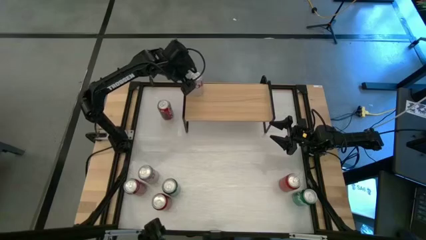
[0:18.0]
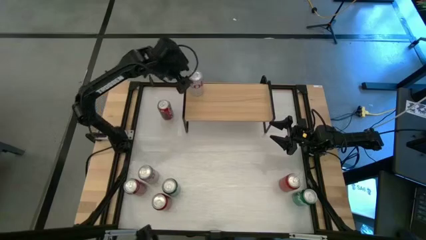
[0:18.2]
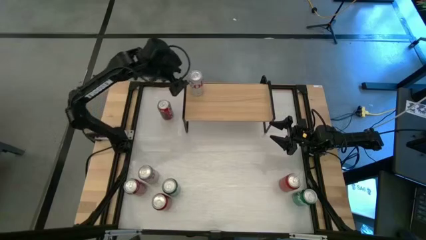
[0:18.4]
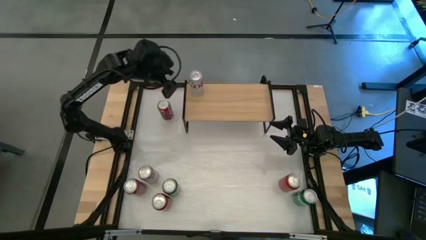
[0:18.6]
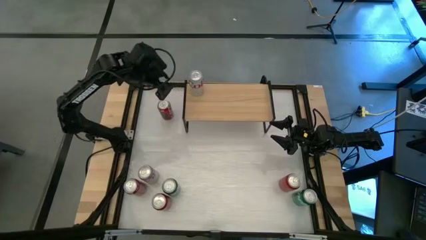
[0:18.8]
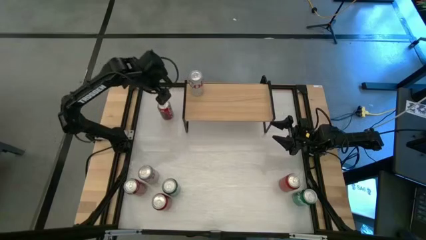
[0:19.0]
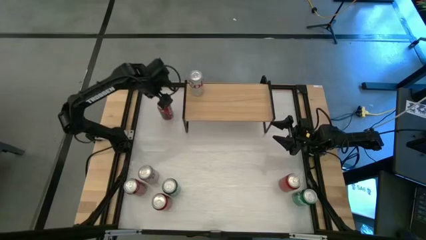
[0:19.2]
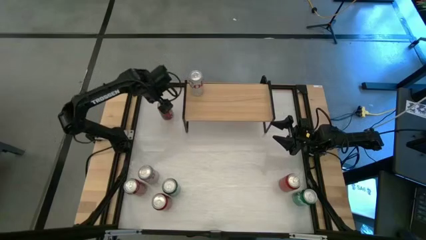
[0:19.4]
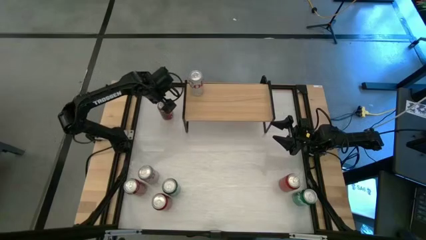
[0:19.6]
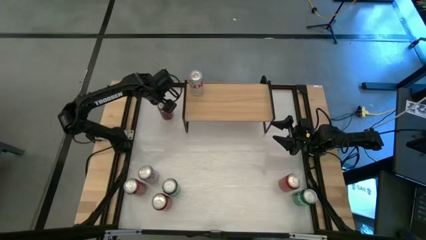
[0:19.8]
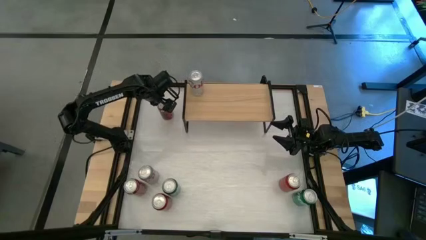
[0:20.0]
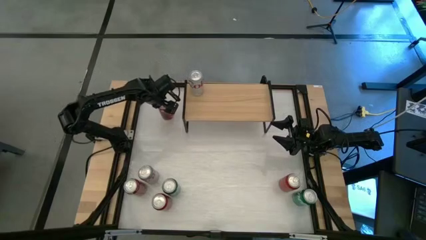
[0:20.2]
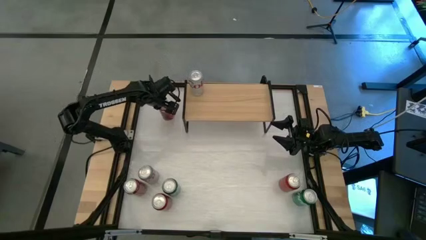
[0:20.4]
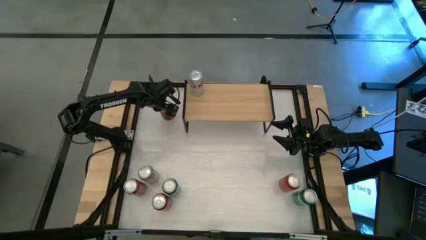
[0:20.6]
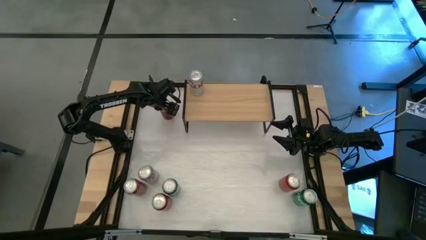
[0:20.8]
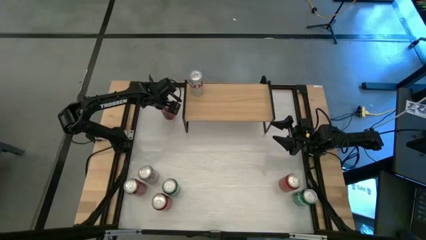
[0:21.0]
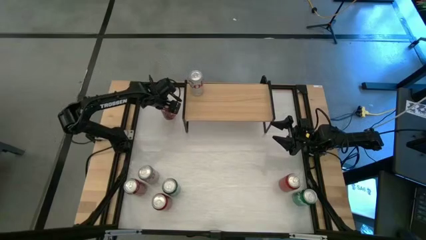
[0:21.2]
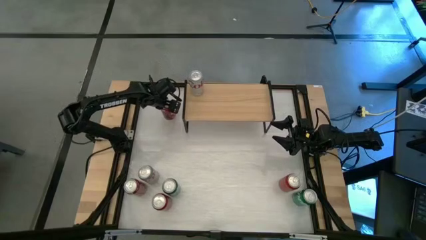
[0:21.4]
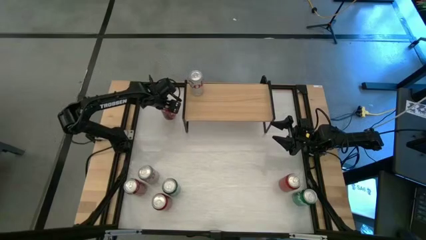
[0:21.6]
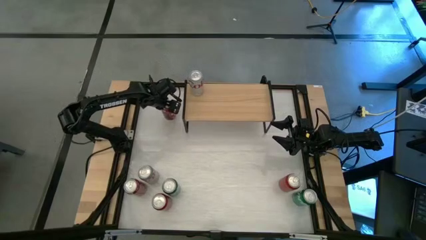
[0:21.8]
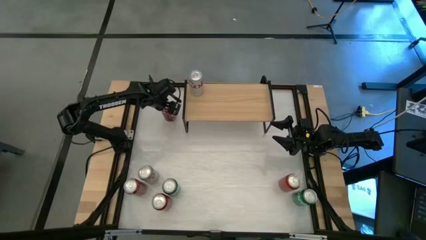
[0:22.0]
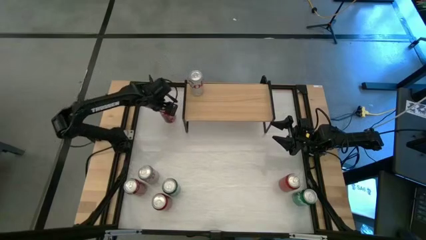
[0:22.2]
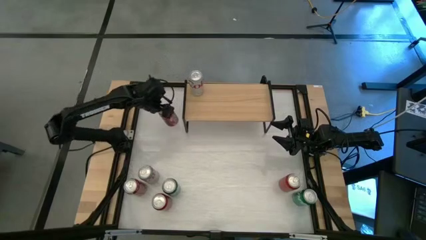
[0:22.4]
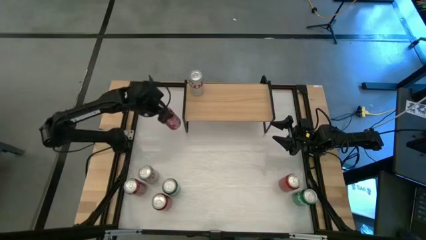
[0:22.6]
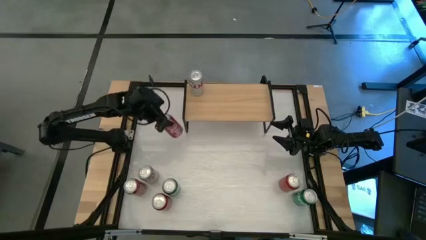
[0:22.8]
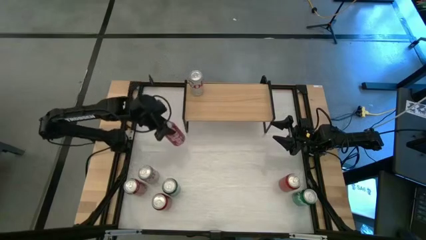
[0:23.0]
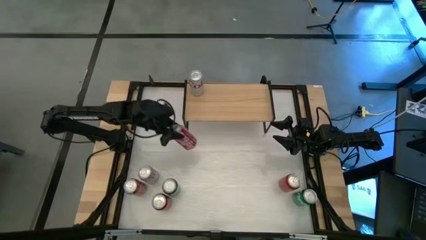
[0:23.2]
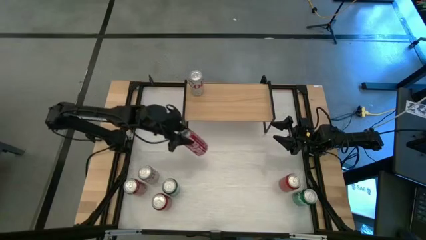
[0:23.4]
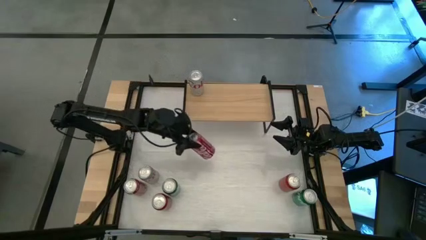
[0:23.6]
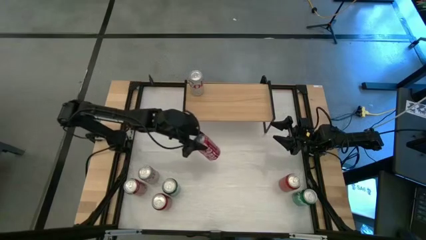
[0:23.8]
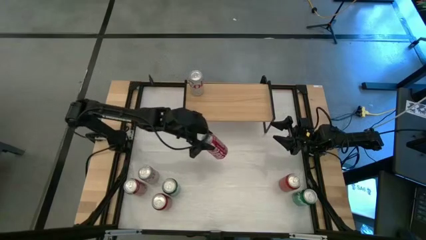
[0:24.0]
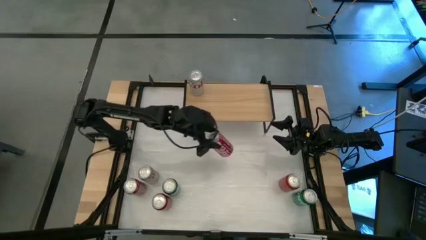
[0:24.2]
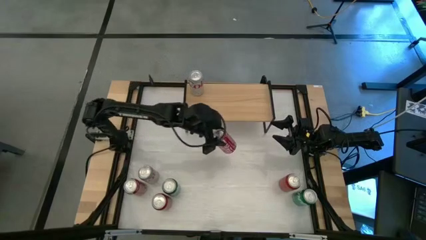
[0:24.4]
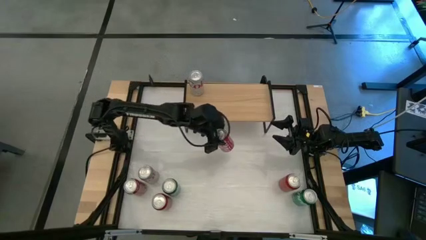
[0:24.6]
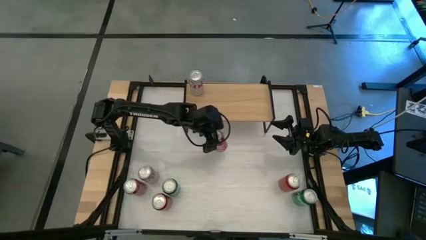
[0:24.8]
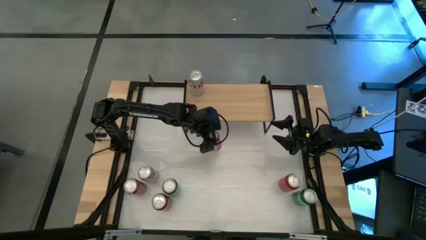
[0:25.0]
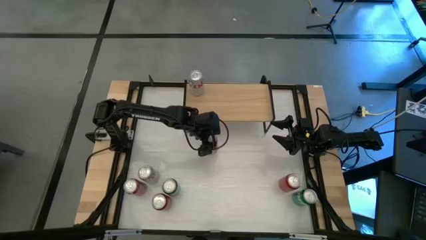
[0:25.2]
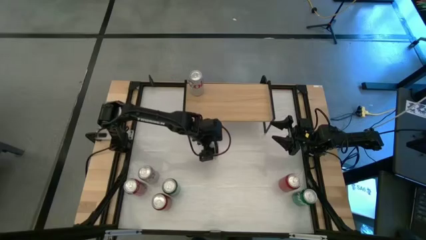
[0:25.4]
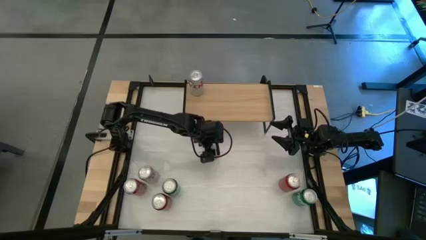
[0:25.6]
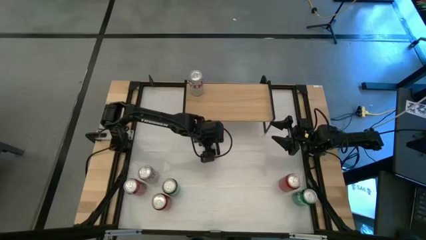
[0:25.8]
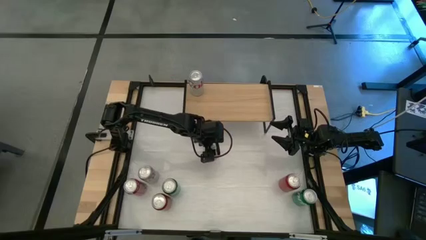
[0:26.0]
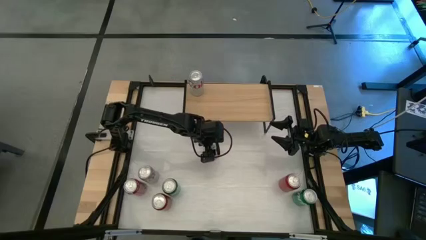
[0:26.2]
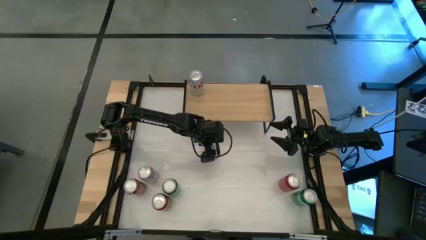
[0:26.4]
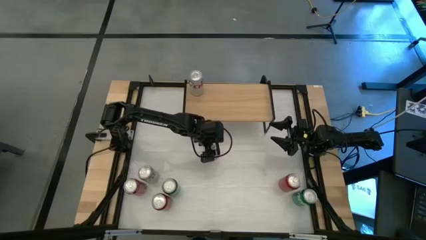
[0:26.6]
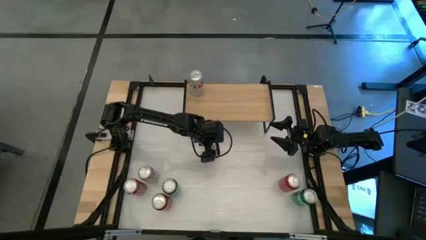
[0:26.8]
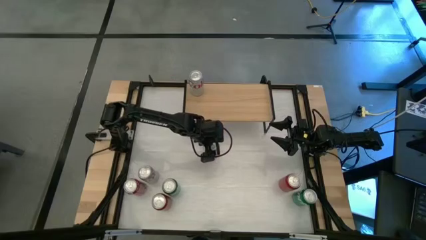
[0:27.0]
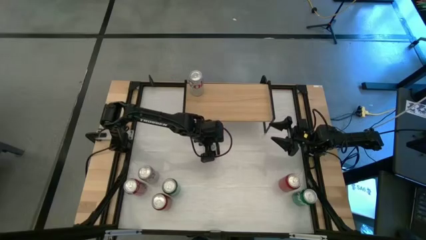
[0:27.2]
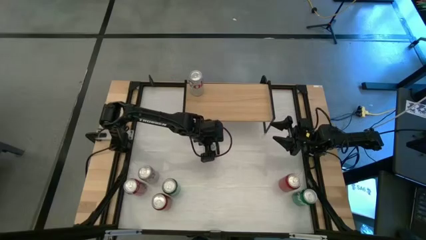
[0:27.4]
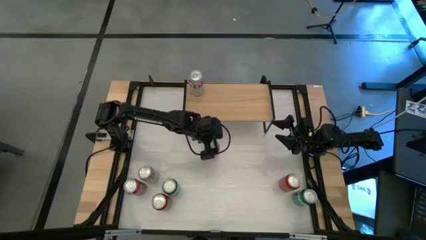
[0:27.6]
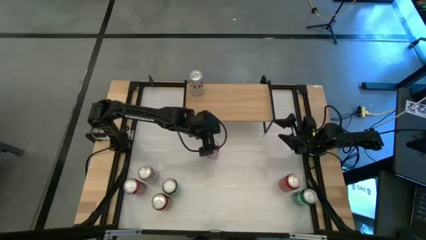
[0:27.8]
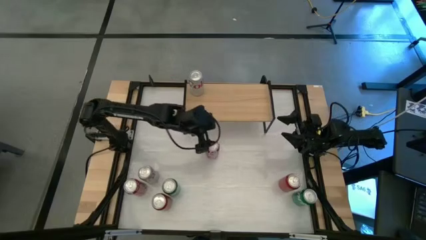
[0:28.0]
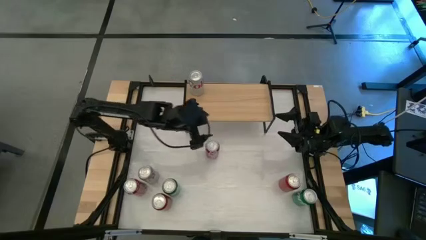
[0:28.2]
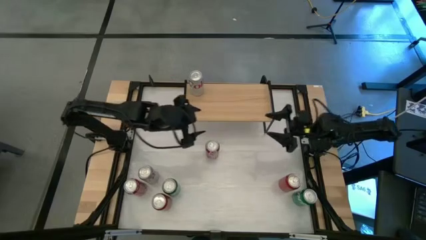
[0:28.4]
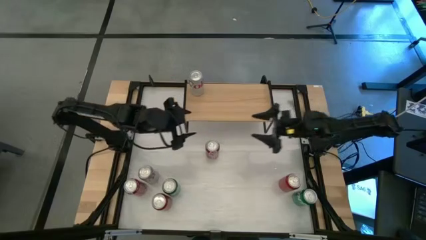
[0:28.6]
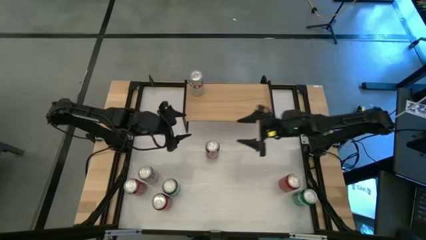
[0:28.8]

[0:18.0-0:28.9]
Task: Place canned beverage on shelf
Put the top red-white soda can on the shelf

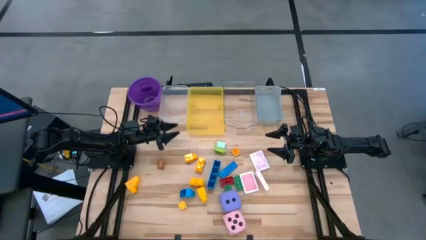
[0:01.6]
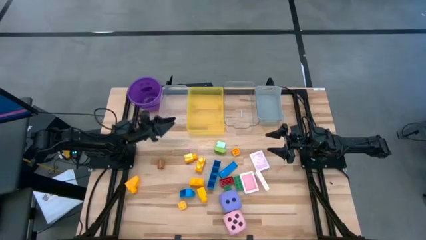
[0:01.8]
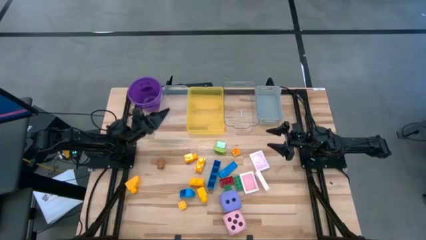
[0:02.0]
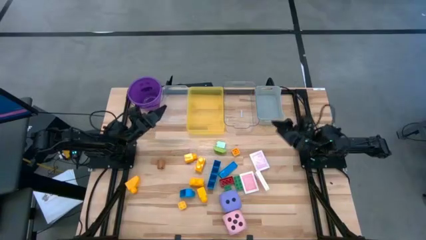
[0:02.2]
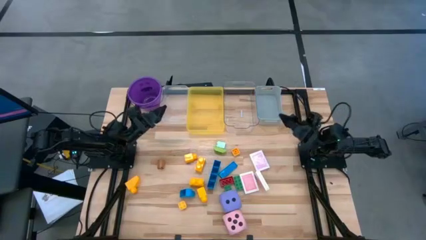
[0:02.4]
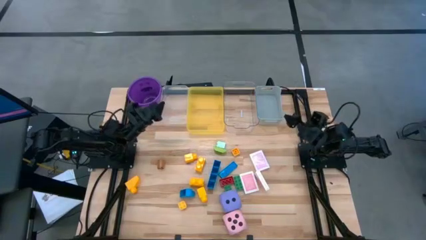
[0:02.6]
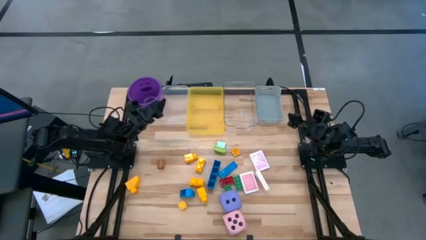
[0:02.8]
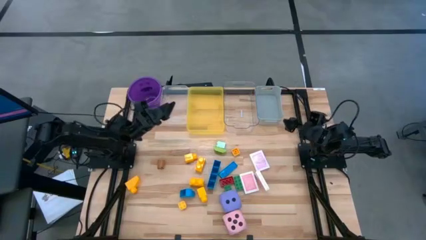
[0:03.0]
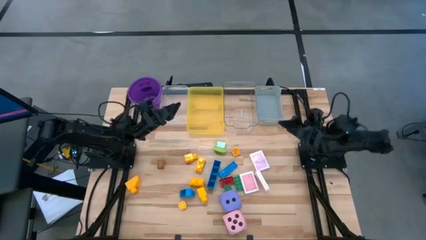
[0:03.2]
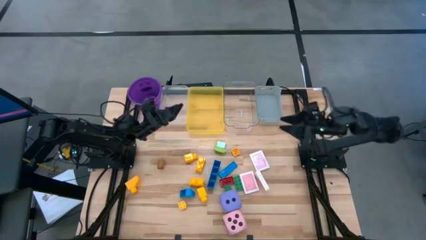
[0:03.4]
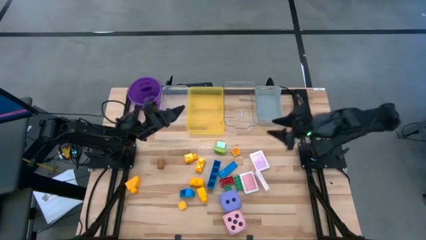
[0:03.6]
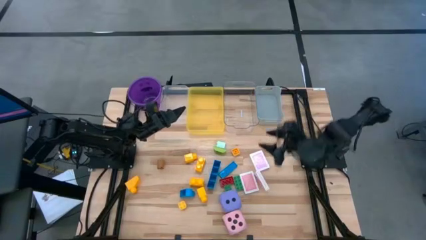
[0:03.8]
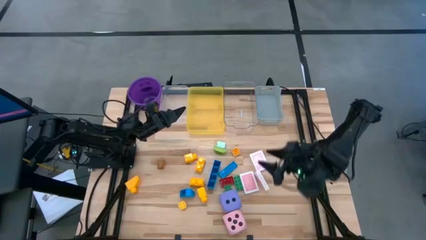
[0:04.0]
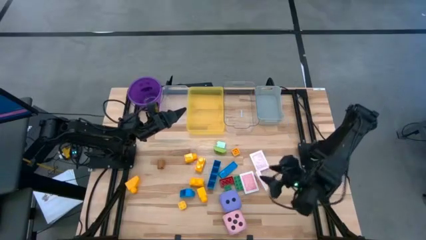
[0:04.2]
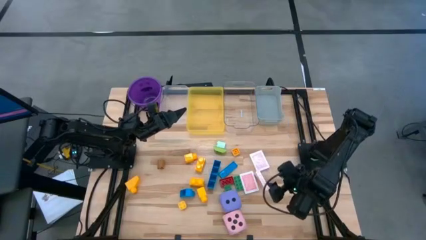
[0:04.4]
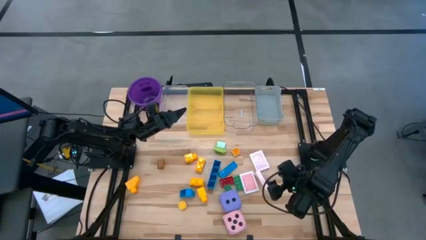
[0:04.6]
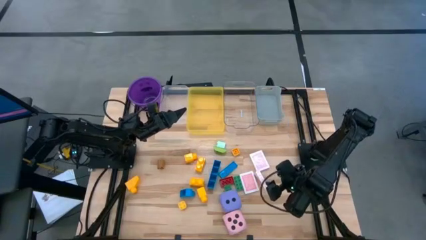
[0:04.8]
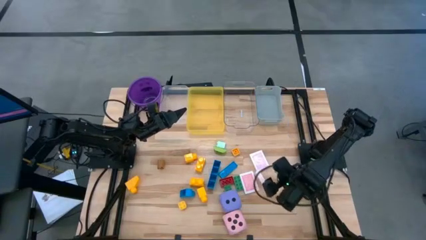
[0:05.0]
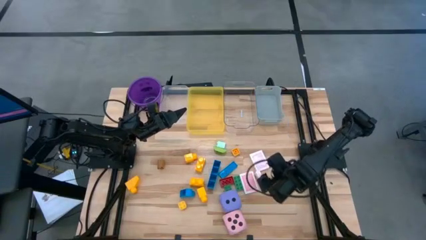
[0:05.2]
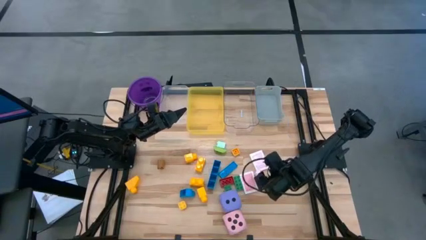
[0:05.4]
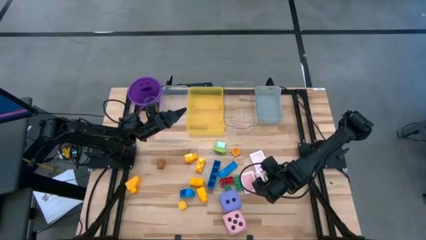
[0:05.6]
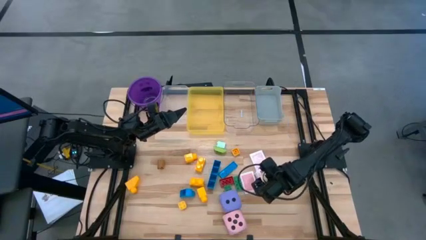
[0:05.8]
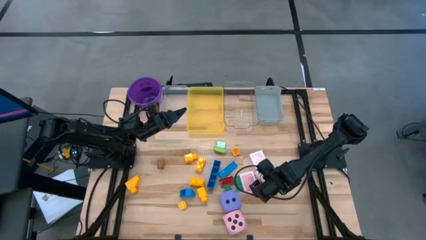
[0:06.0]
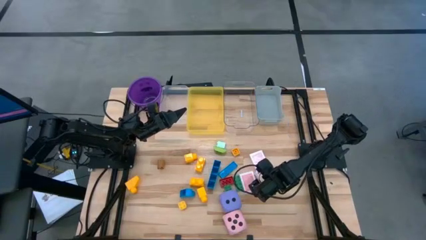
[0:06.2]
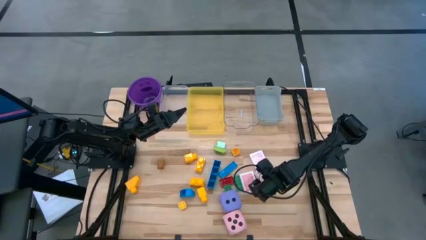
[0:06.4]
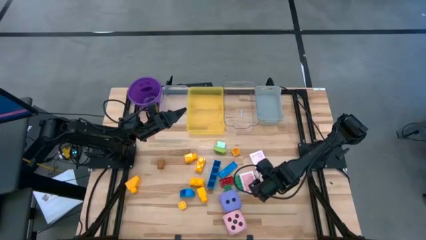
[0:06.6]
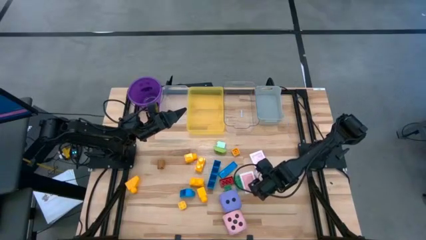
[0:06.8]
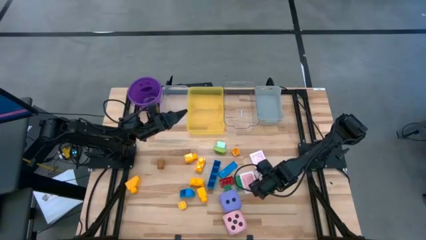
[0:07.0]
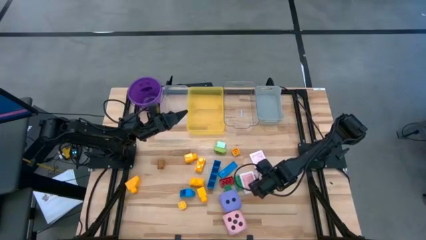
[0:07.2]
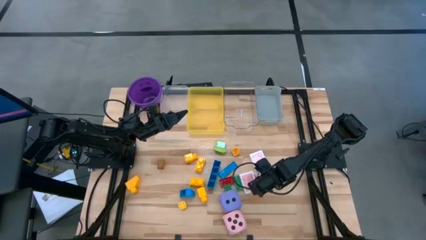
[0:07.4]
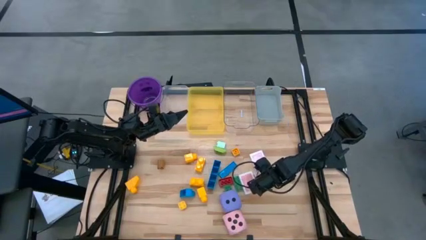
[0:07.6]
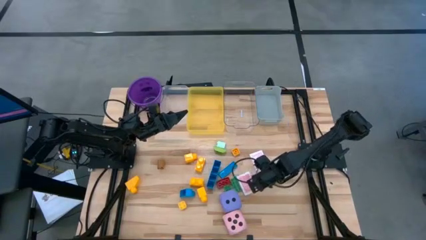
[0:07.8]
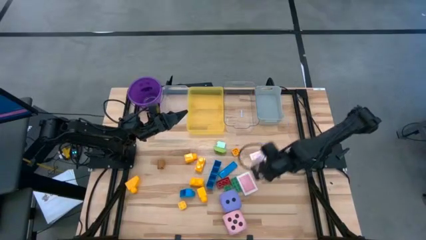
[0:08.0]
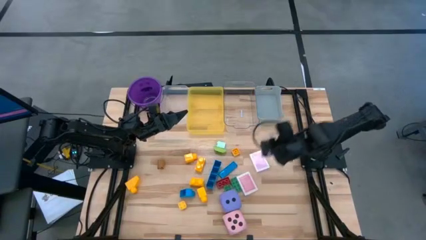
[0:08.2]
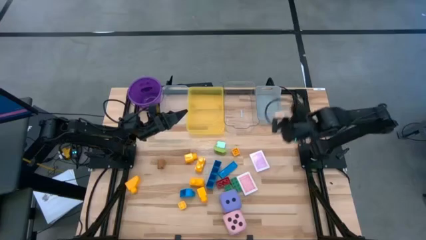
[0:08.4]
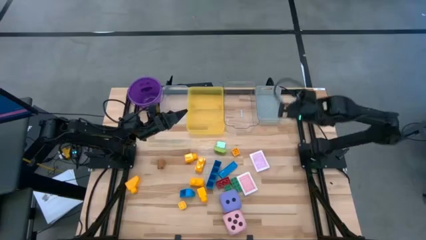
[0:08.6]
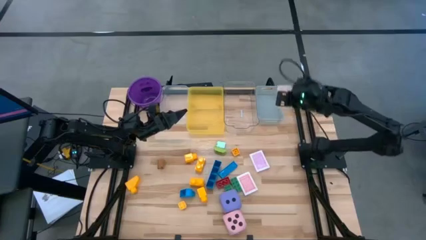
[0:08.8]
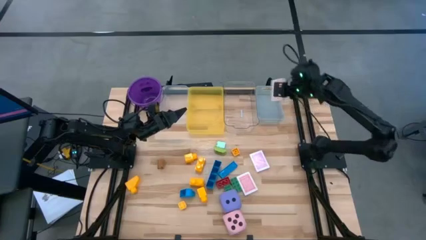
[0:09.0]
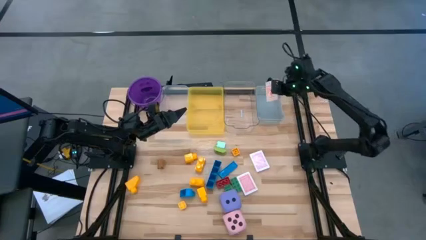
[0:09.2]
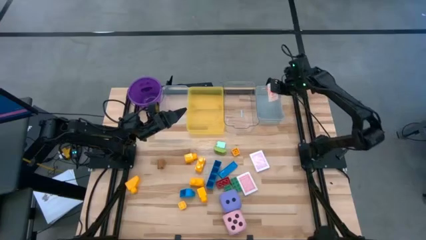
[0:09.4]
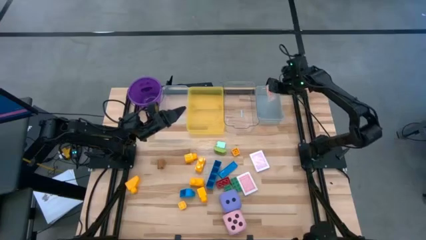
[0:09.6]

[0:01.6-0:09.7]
Task: Pick & Place Toys
Put the orange deck of cards into the gray bin
